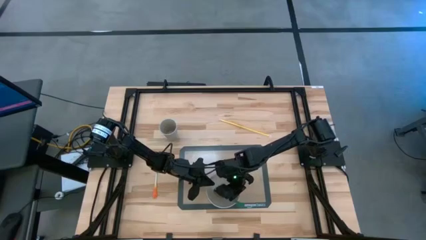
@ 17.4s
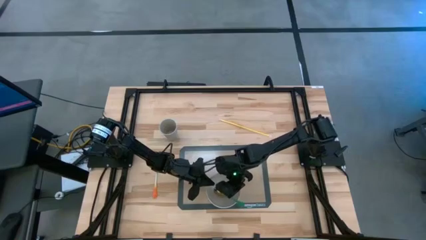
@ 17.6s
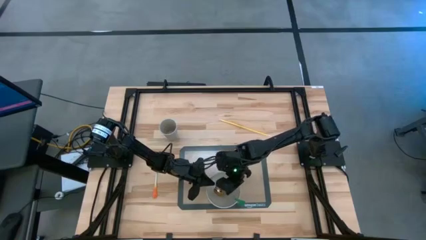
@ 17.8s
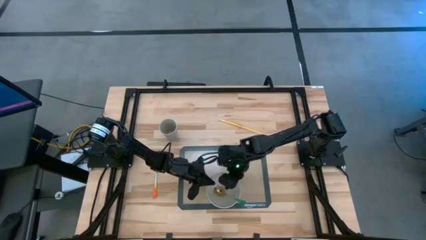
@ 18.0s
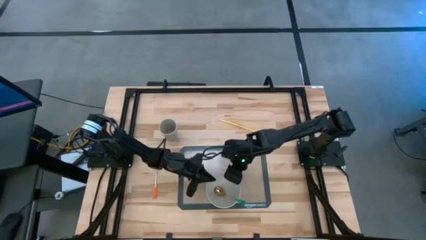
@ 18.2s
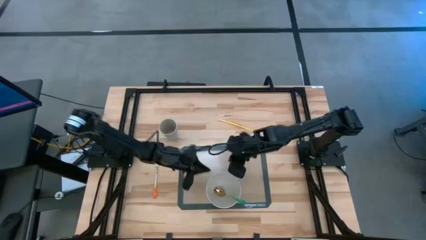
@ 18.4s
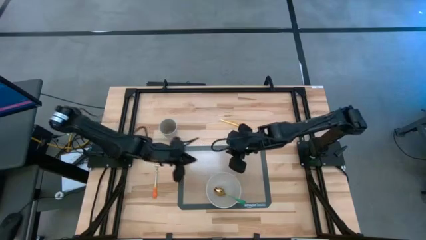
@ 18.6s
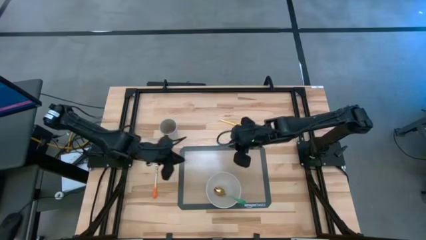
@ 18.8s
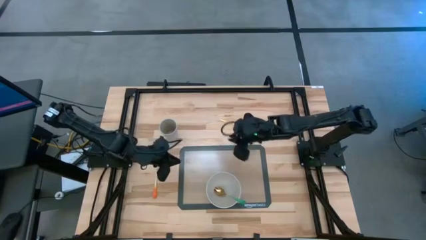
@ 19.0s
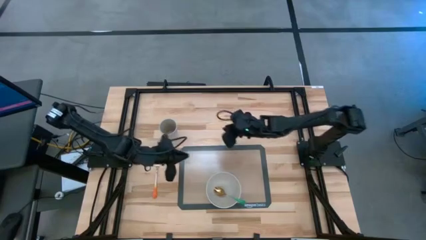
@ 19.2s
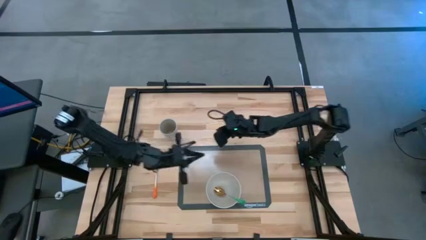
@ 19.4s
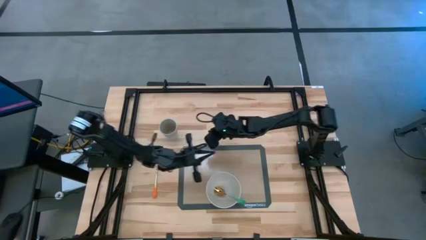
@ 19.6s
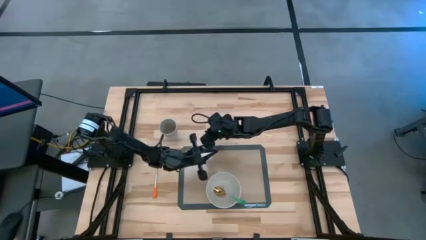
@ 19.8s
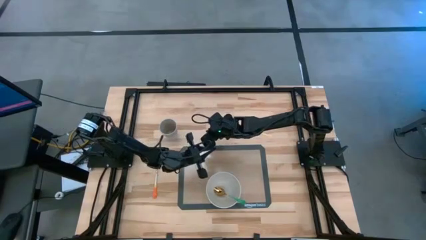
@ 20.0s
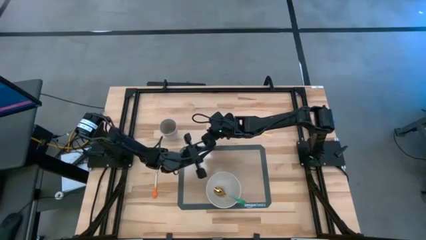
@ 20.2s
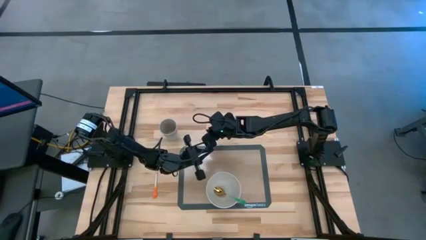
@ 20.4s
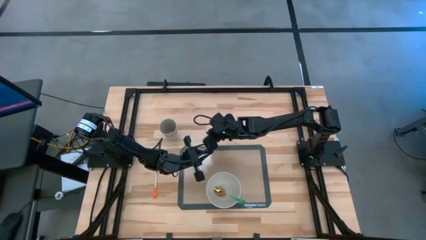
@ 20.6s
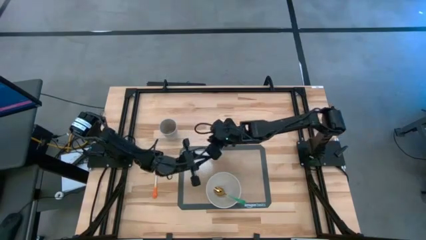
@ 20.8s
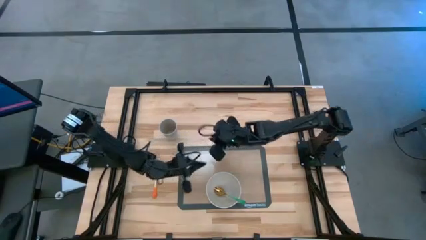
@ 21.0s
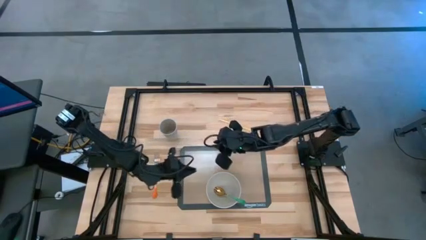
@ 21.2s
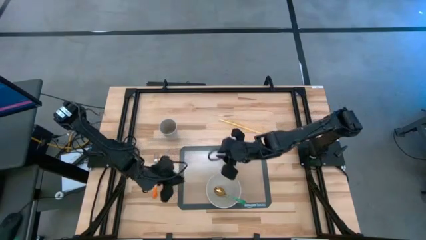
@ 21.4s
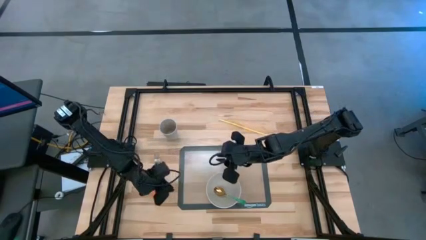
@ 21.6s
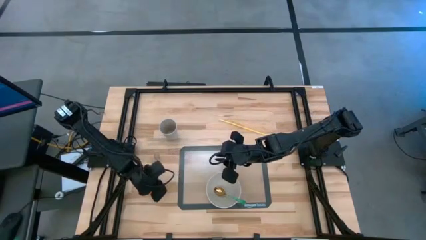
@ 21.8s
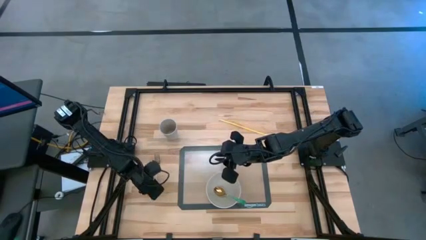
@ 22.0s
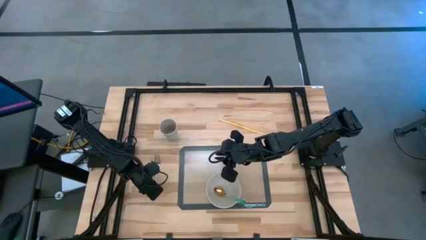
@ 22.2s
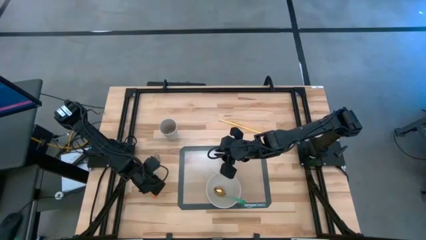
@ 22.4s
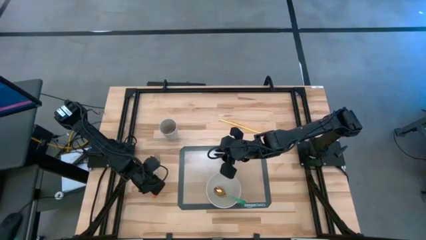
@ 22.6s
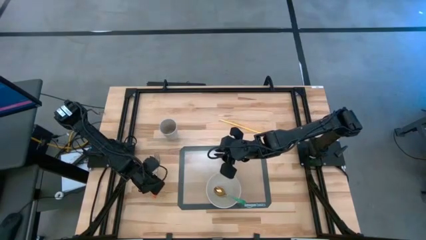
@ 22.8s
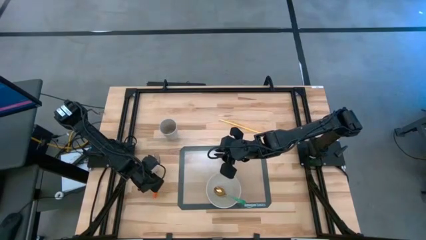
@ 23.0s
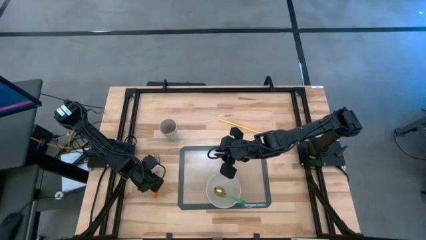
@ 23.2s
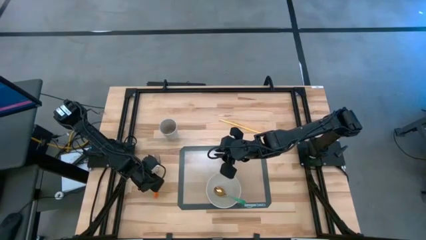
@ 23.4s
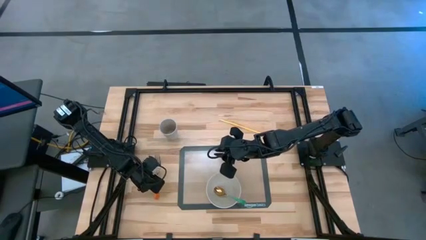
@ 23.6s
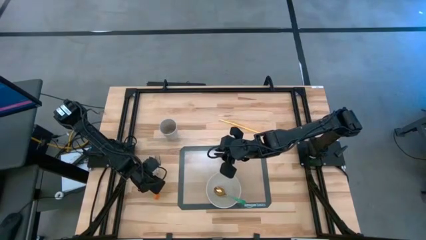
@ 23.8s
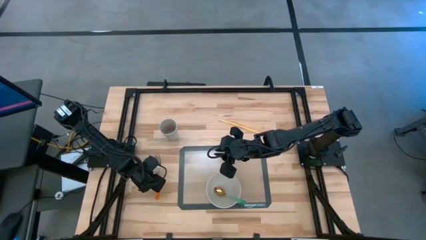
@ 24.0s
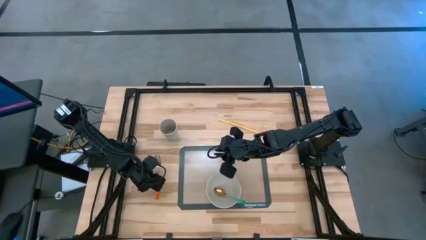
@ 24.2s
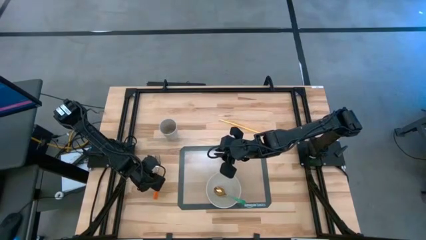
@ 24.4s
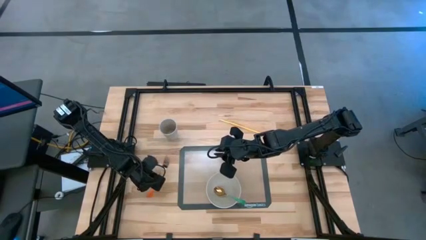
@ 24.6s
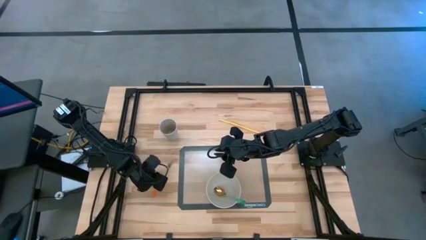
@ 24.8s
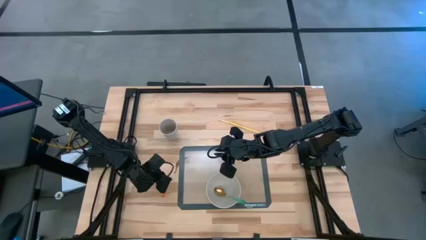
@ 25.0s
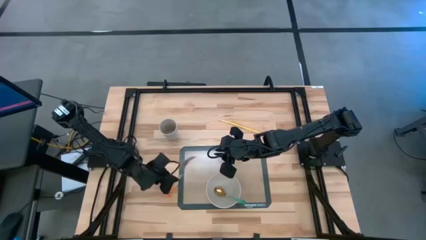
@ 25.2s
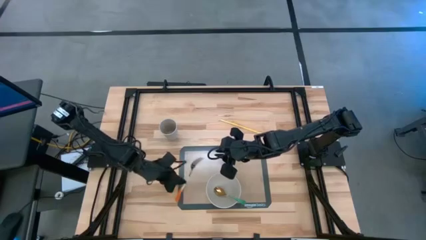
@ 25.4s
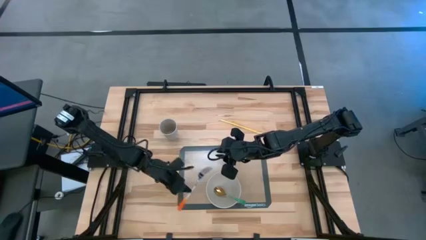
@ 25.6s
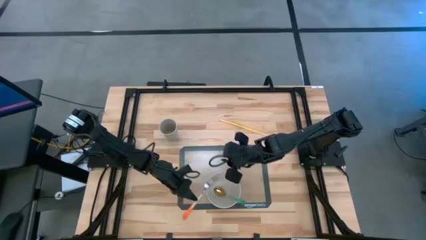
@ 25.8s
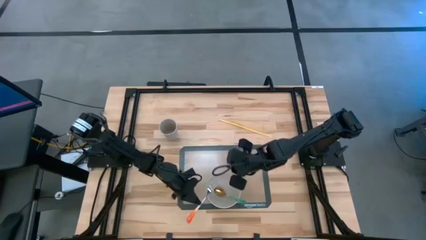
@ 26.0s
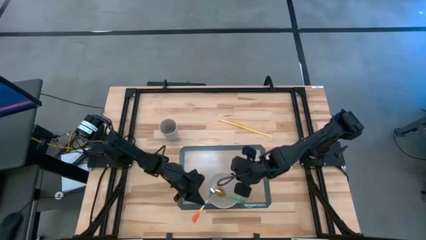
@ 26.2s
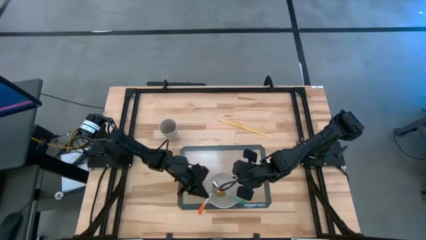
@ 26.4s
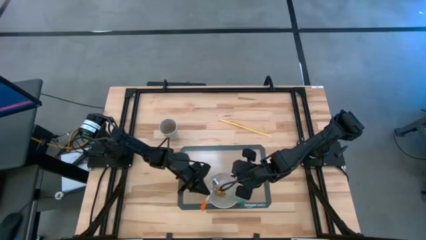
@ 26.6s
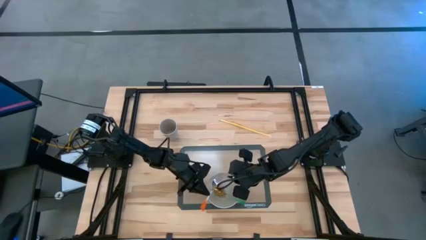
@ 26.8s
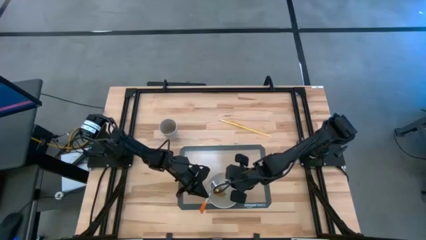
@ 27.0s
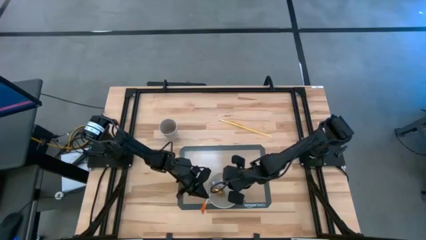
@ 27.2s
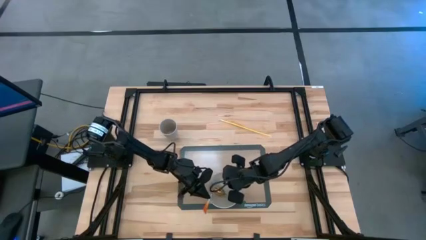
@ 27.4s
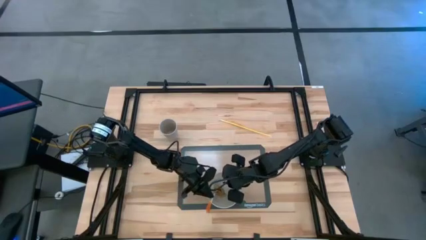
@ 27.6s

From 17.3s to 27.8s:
Task: Pick & Place Utensil
Put the fork into the bowl on the silicone mat

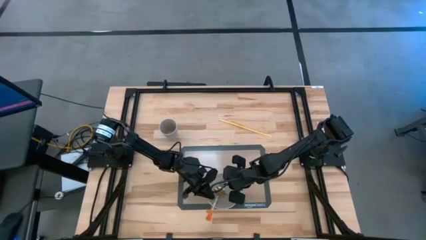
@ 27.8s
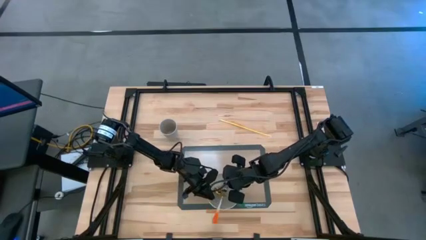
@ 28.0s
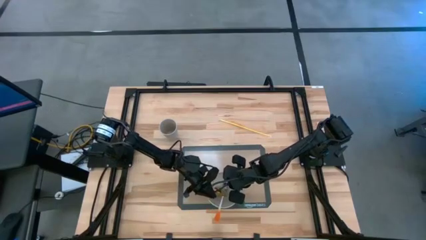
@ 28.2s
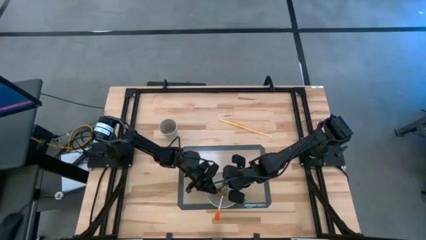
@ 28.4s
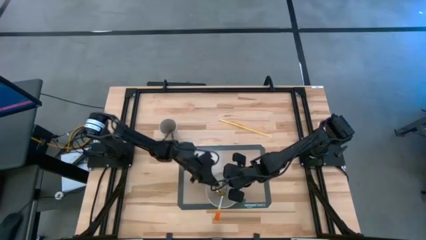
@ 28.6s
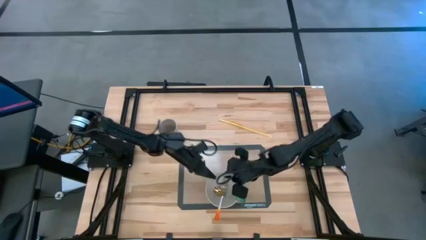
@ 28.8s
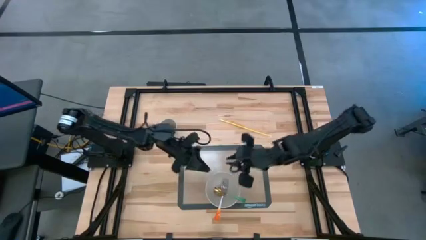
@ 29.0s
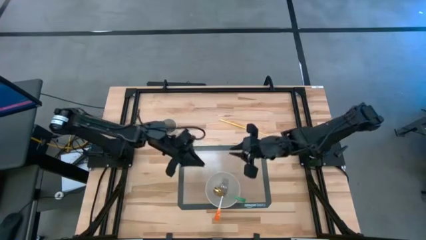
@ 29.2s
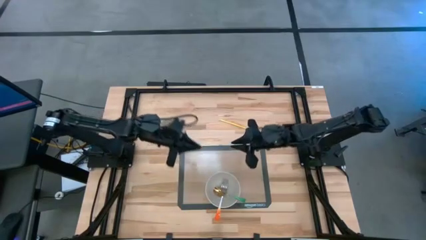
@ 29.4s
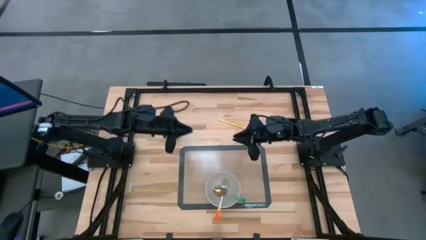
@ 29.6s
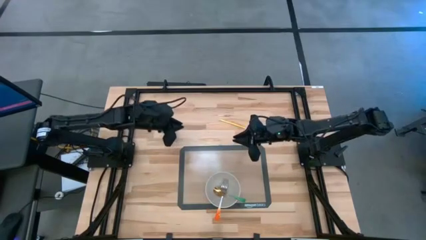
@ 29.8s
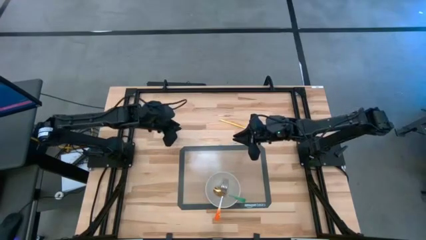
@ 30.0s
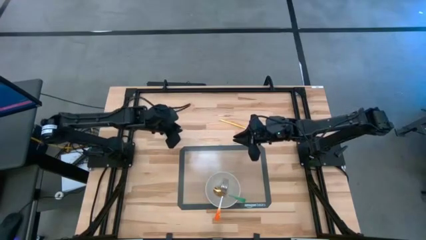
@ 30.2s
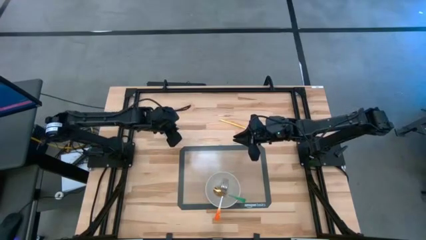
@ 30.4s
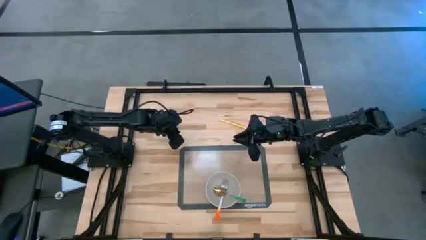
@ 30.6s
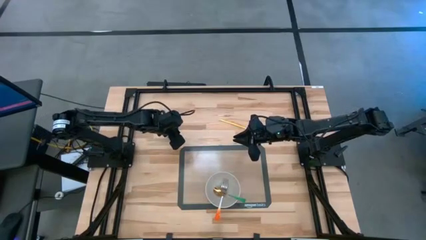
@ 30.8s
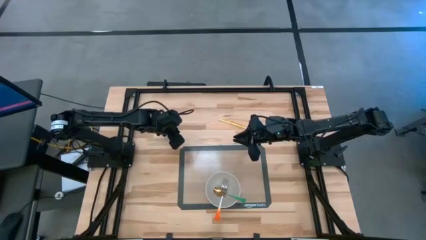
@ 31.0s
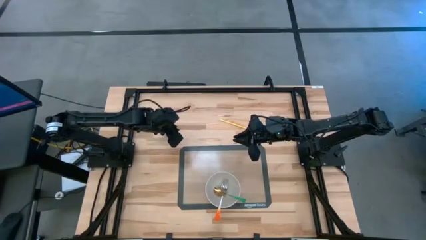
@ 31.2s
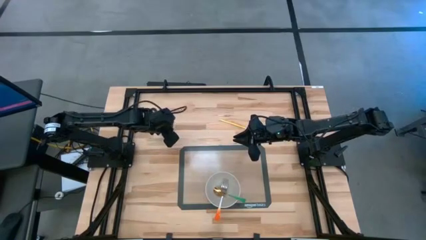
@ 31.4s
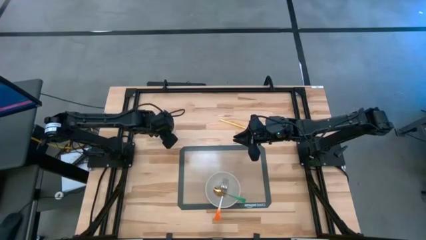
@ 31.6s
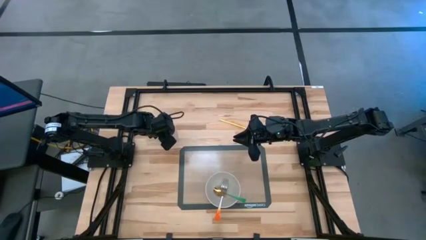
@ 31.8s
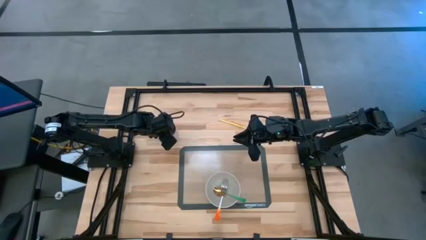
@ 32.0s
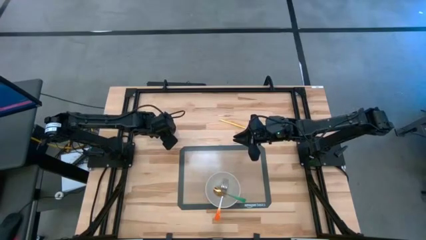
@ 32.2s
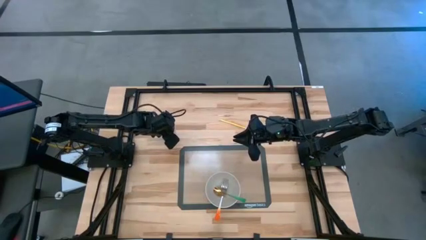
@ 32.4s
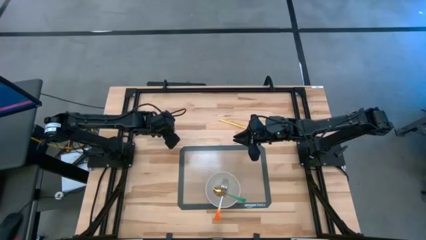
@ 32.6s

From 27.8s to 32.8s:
Put the cup on the silicone mat to the top left of the bowl

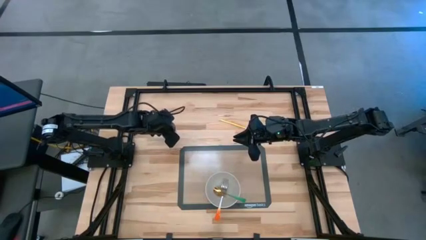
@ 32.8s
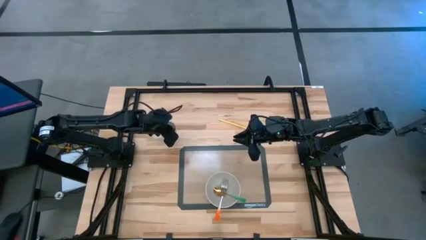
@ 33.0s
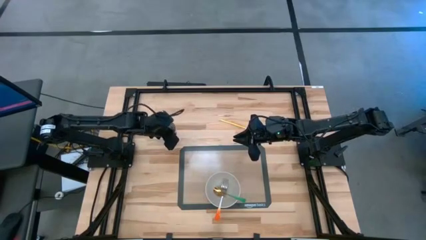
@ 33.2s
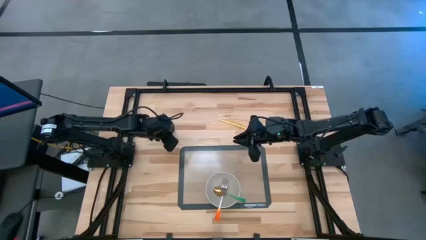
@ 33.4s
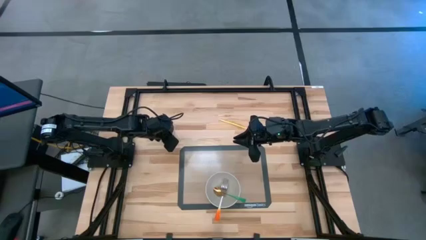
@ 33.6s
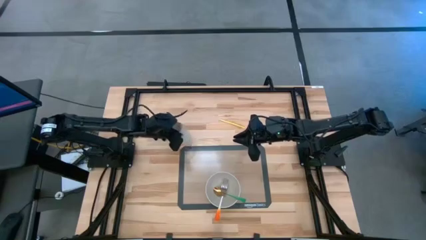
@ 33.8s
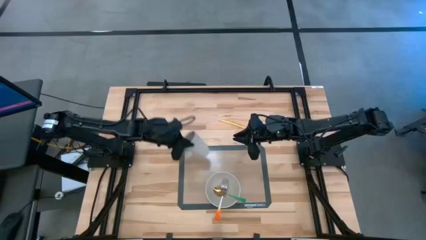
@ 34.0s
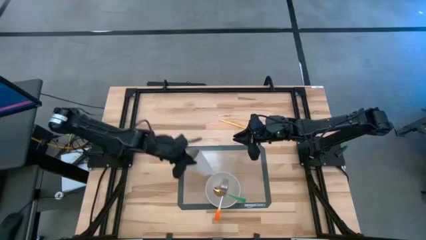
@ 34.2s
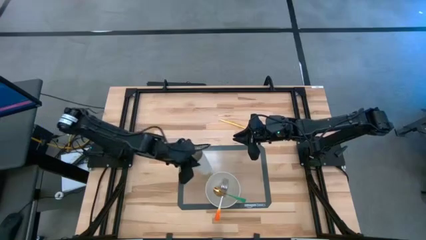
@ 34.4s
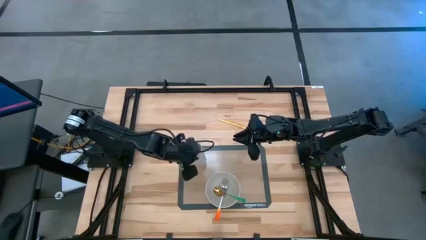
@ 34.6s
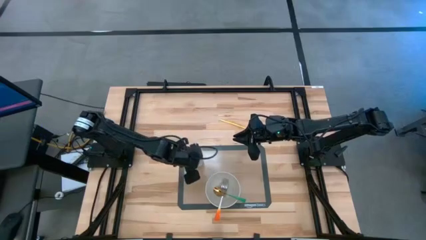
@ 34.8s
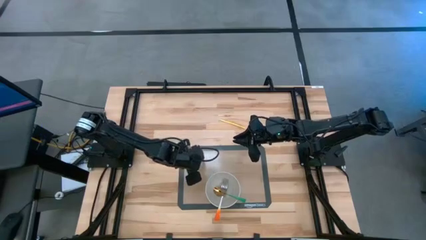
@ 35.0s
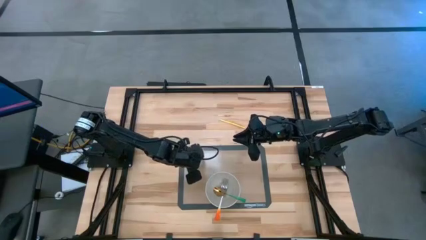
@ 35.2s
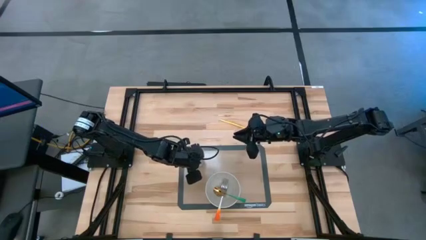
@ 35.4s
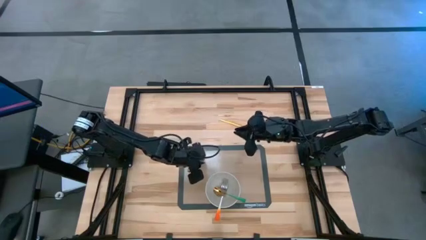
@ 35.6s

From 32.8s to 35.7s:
Put the cup on the silicone mat to the top left of the bowl
